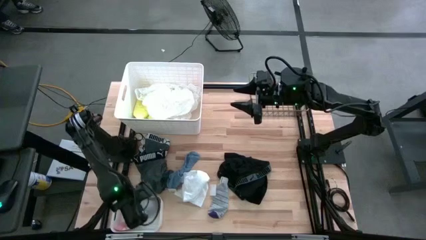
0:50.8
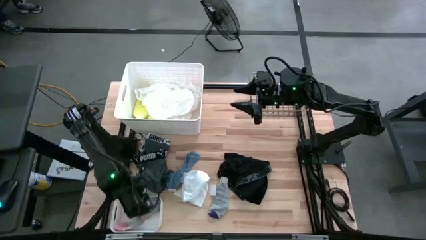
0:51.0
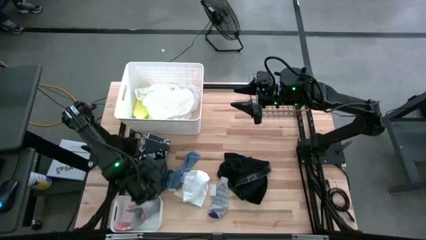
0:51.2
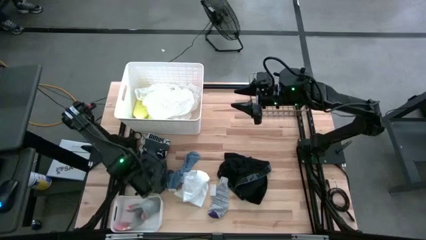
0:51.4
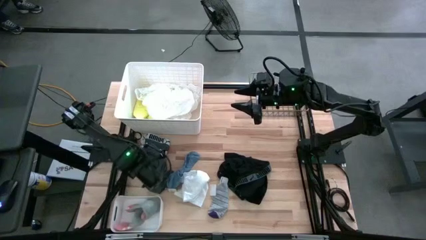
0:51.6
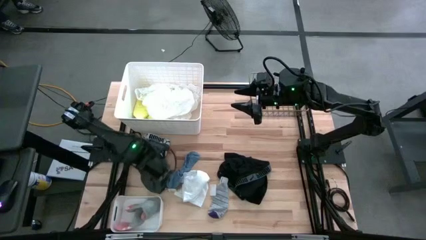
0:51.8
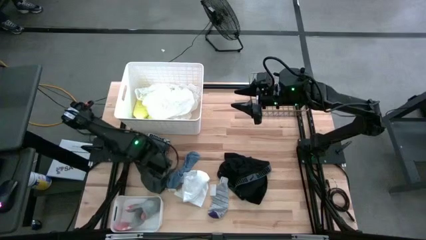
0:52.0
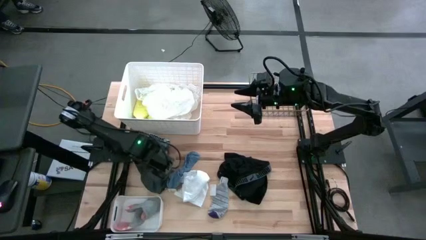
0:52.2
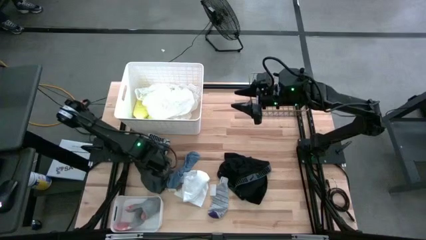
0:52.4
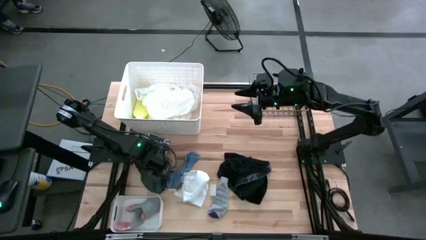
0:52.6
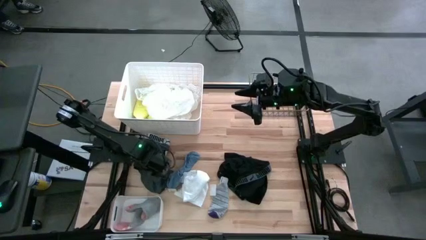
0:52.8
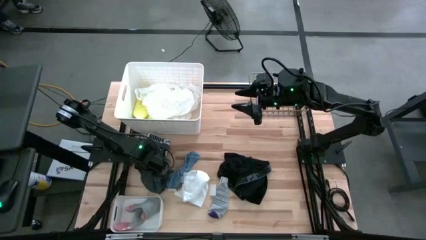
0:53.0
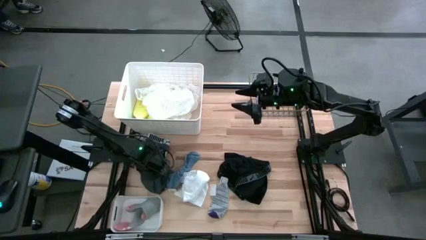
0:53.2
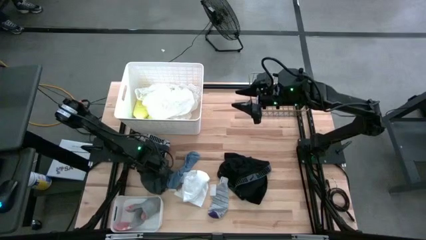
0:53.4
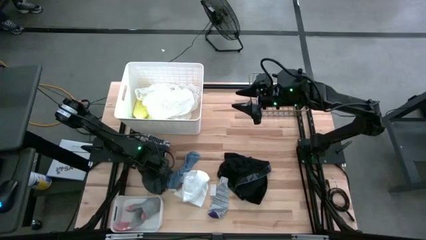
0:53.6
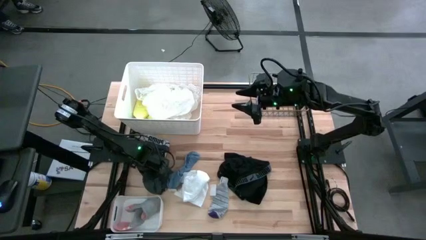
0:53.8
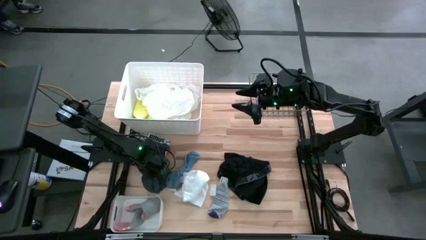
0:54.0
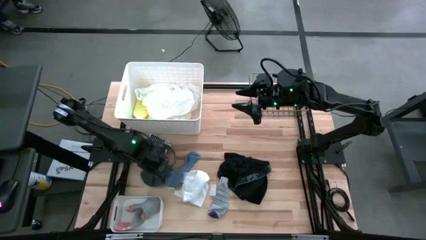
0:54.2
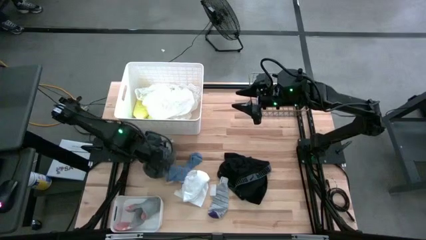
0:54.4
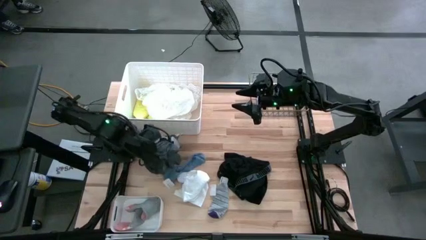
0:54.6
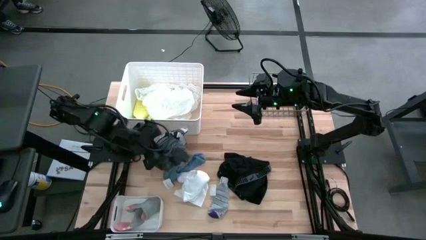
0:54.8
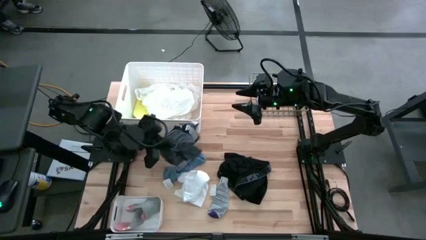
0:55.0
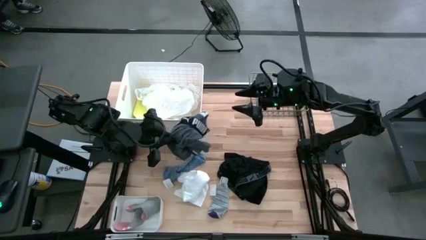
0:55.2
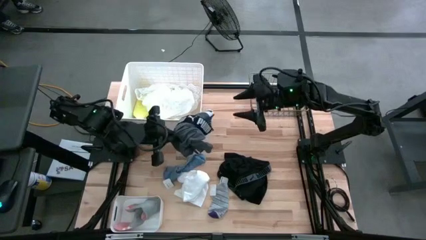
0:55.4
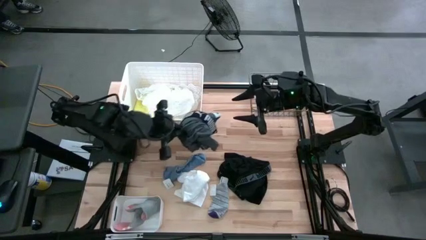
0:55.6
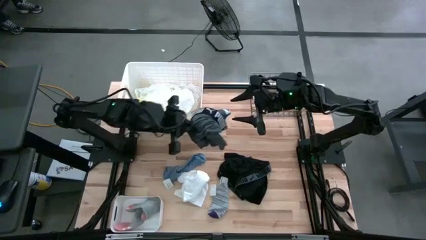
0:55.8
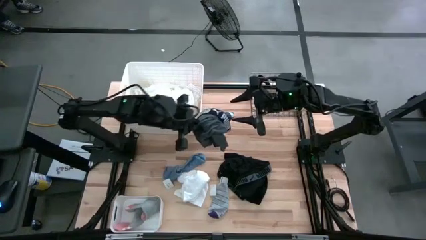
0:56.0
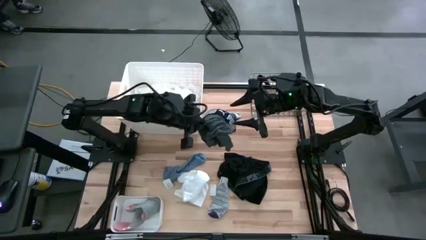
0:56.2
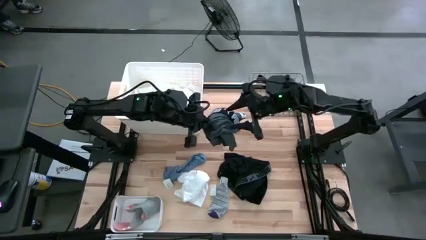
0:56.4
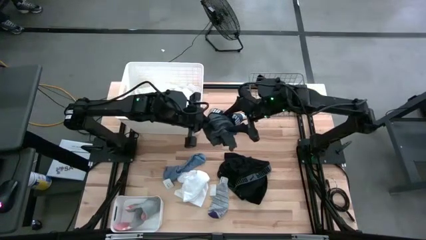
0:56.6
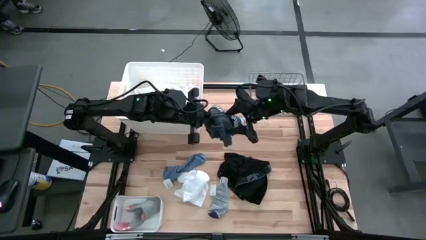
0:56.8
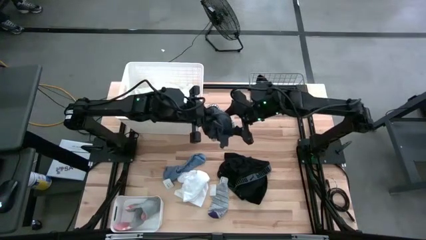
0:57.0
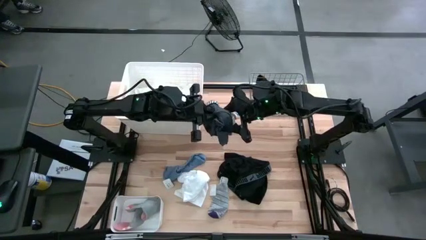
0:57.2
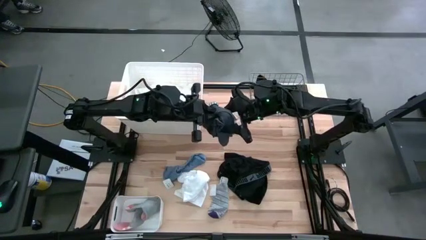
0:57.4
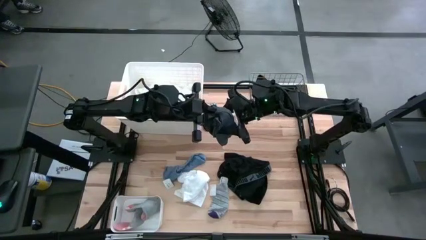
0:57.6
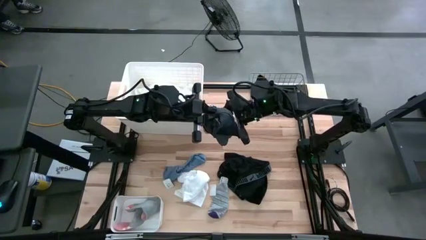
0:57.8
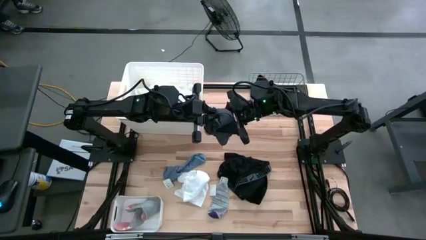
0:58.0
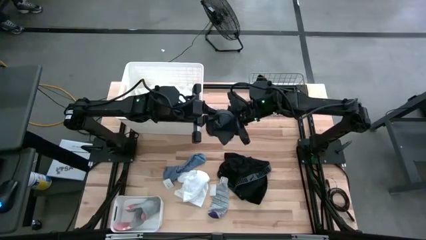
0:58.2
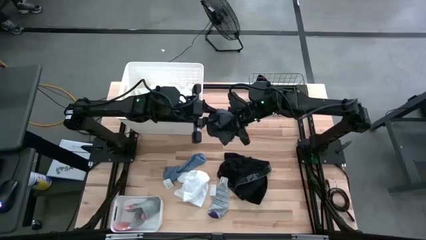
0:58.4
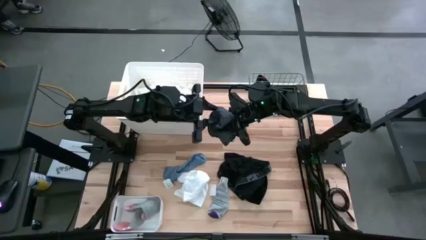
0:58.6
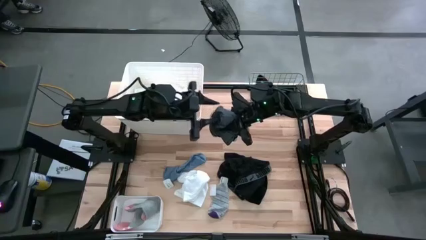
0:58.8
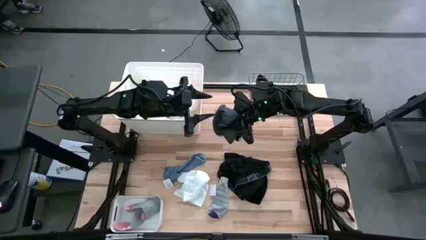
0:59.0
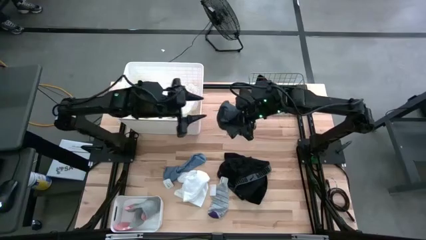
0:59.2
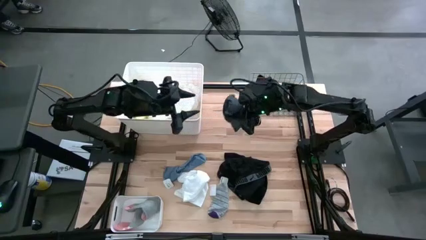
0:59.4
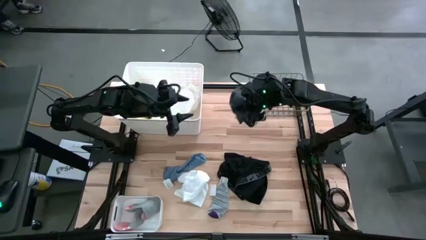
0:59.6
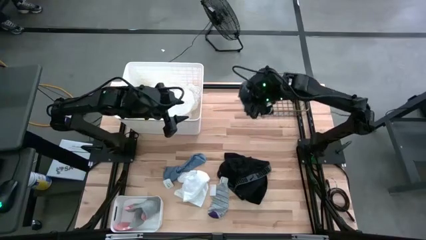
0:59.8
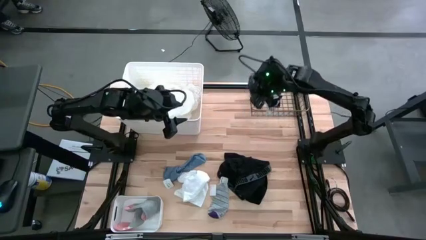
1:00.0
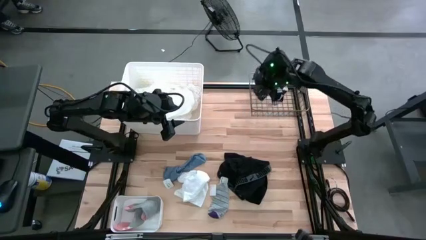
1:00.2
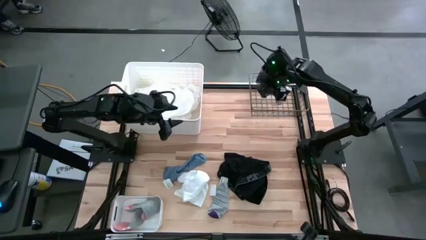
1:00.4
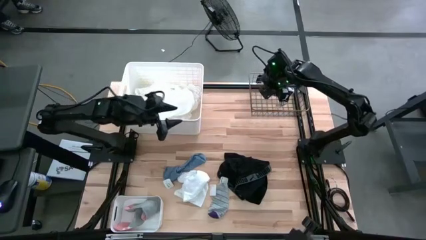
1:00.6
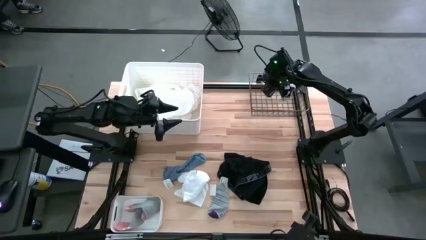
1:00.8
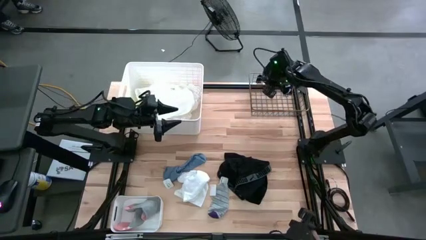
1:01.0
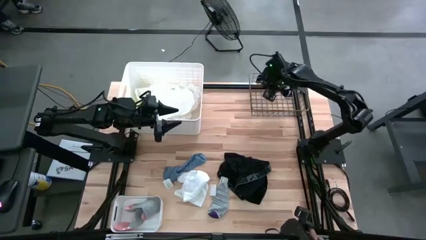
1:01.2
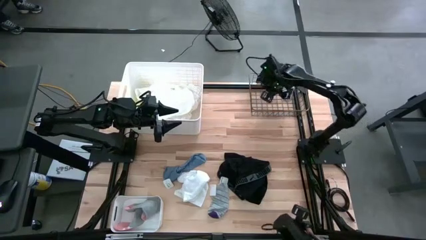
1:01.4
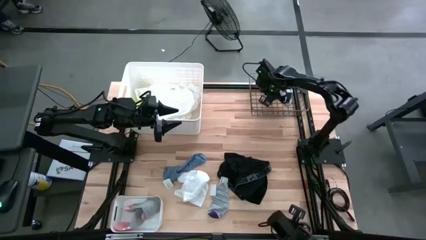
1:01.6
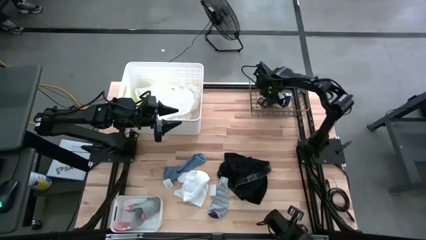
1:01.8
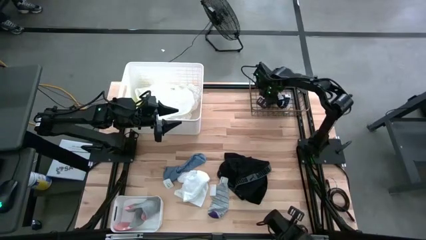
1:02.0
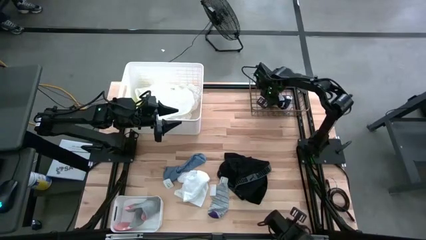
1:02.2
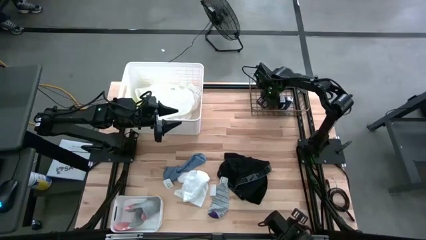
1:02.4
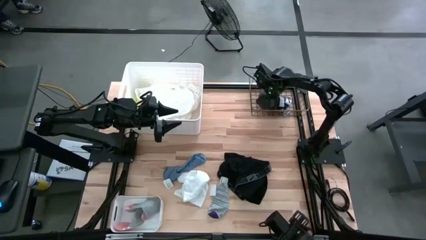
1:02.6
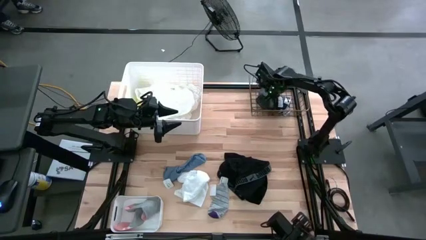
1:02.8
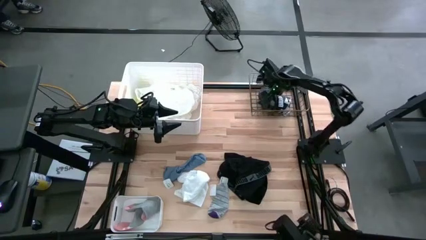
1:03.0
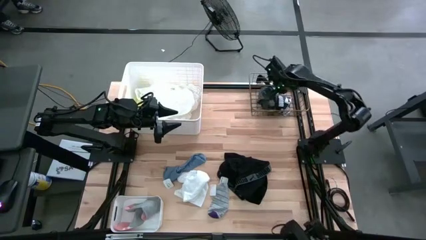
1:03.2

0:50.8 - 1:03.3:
Task: Pick & Place Cloths
Put the gray boxer shorts into the gold wire basket

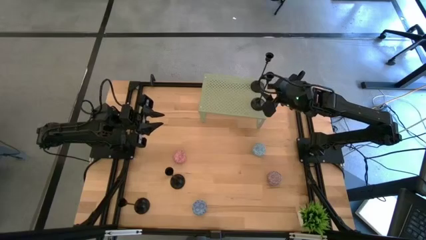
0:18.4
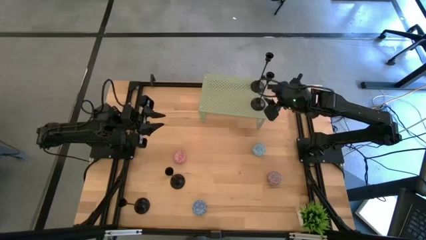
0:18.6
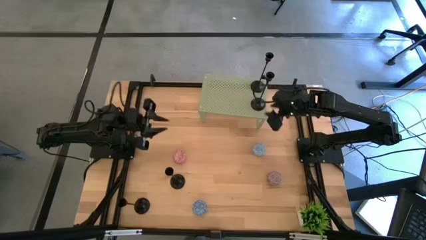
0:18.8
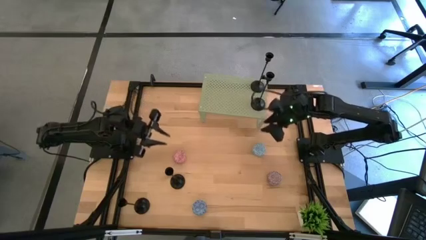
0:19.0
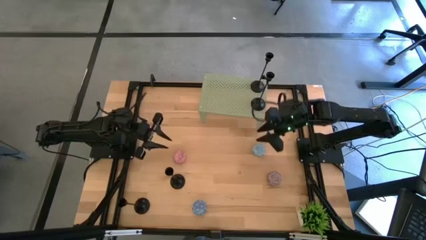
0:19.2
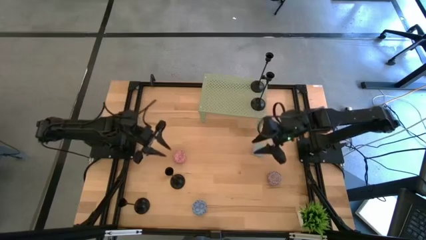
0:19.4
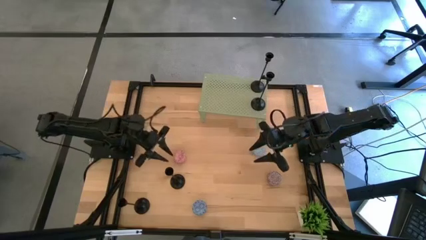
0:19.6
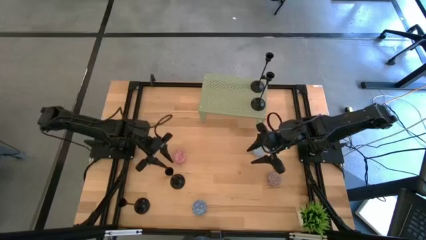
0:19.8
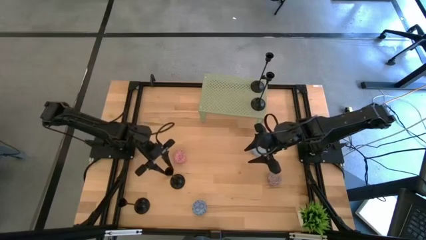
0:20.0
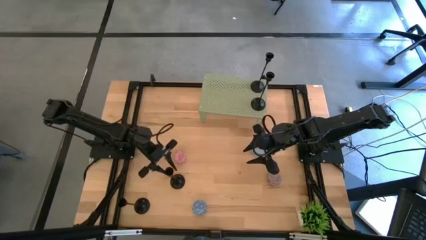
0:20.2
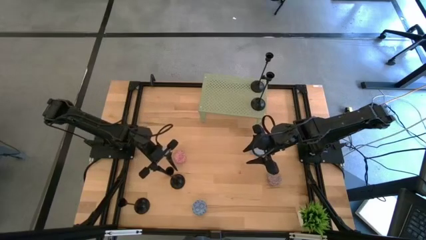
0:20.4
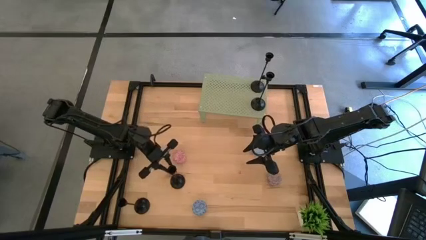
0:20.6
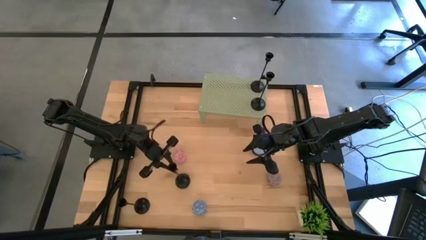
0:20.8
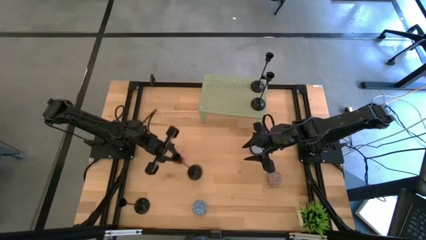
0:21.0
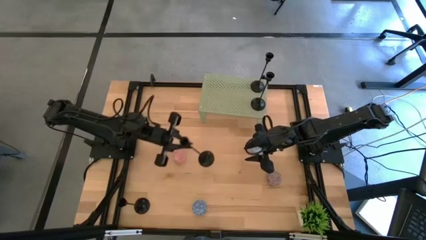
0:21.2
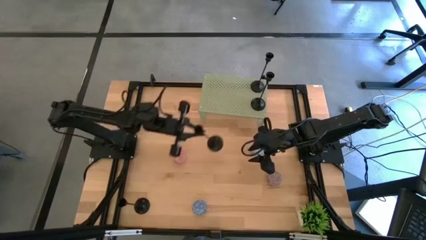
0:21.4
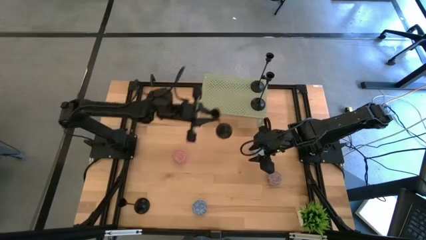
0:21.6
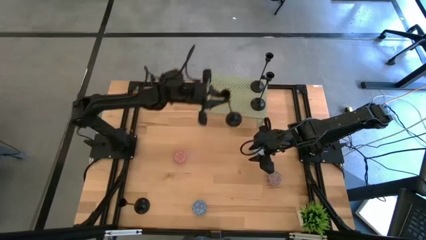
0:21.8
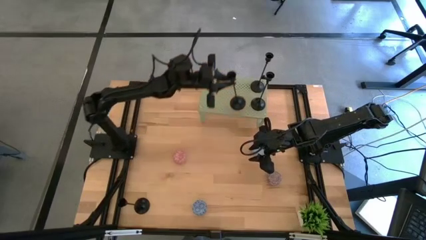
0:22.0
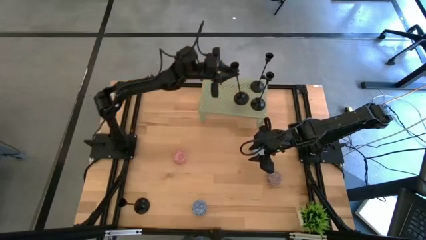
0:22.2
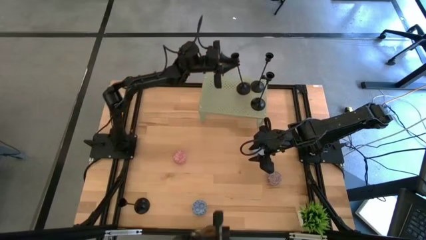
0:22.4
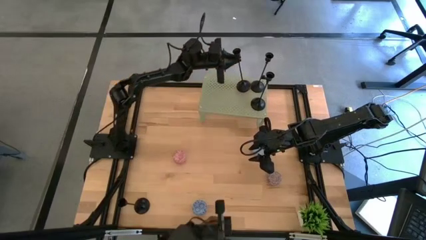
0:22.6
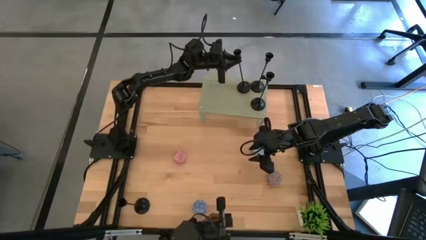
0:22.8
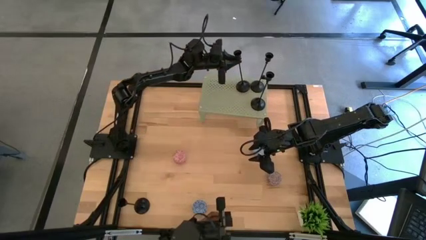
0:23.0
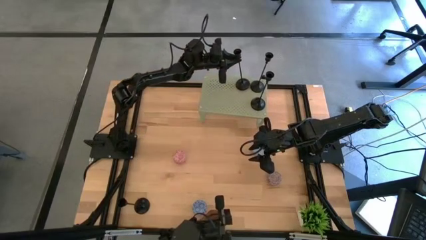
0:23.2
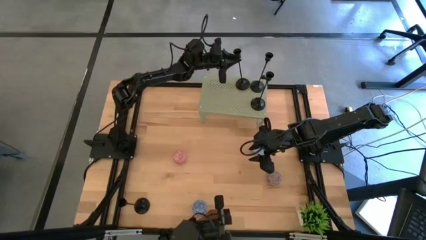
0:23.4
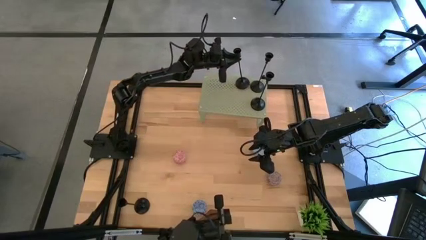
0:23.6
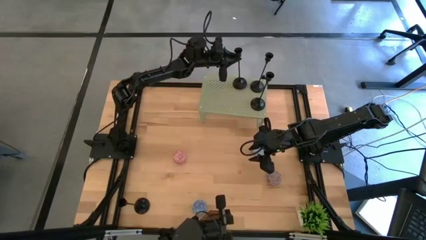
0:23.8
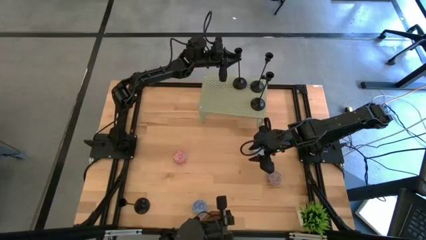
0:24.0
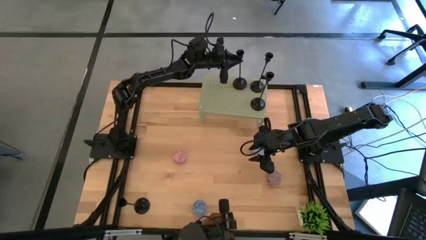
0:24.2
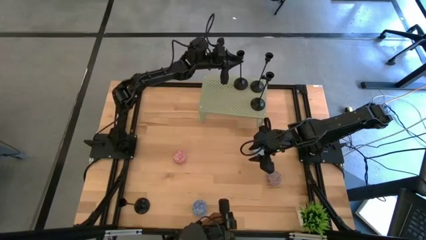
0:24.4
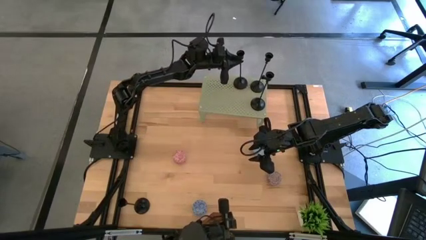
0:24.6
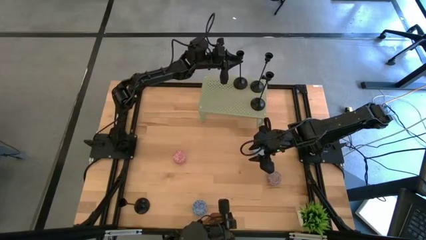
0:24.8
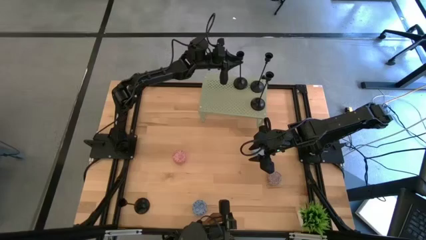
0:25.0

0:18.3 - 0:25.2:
Task: Pick & Place candle stick holders
Put the black candle holder on the shelf
